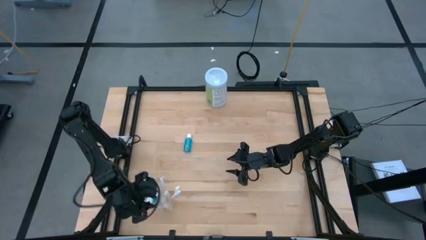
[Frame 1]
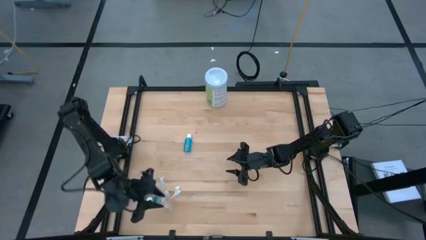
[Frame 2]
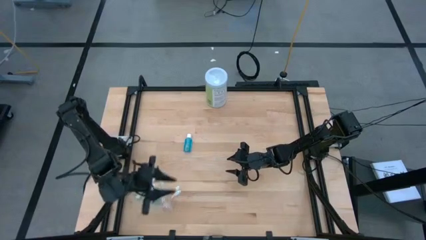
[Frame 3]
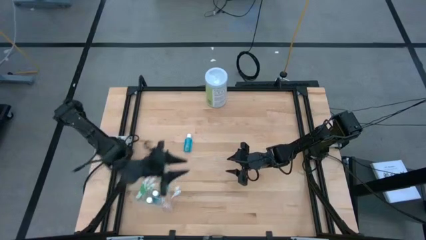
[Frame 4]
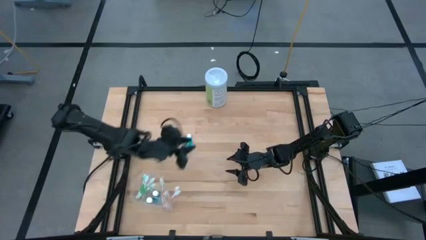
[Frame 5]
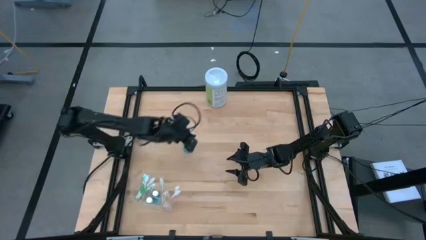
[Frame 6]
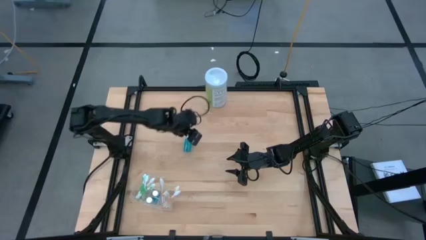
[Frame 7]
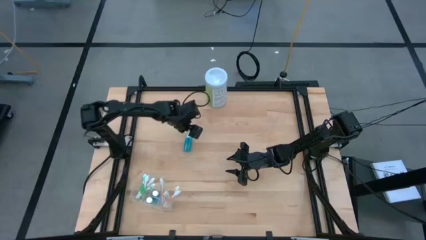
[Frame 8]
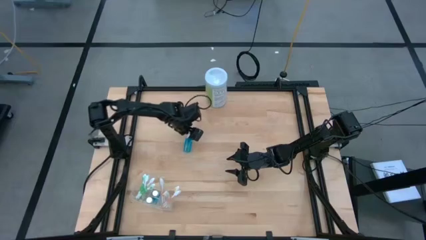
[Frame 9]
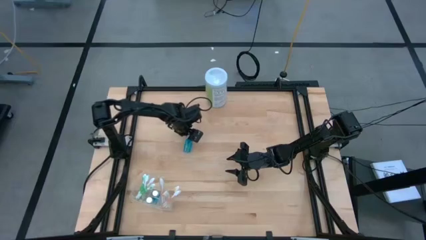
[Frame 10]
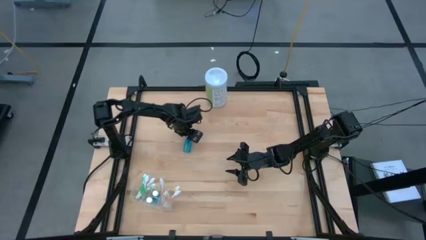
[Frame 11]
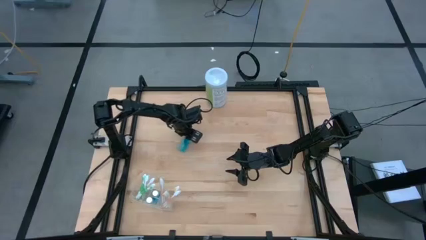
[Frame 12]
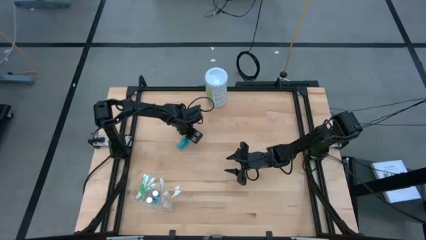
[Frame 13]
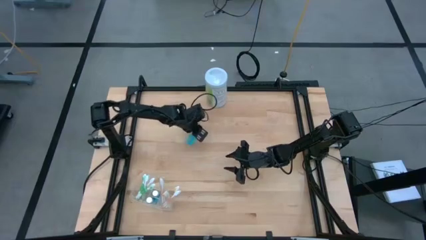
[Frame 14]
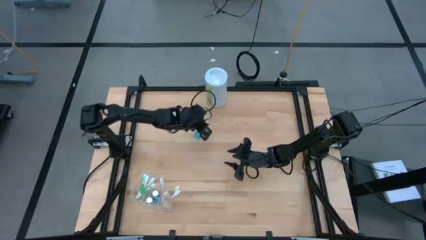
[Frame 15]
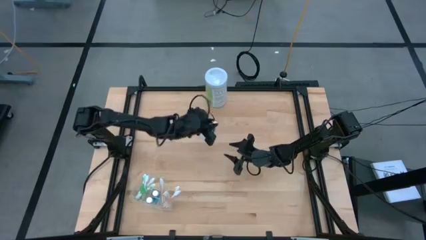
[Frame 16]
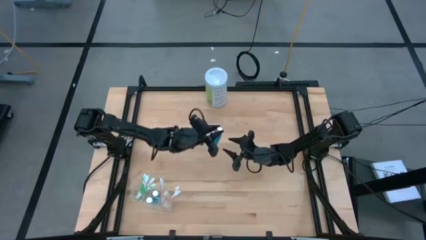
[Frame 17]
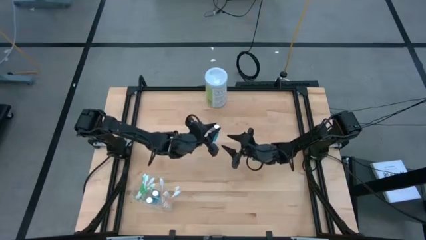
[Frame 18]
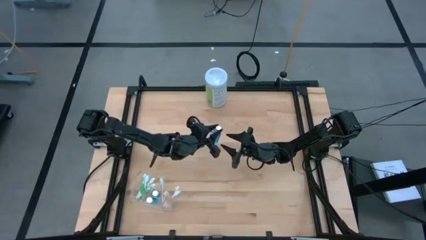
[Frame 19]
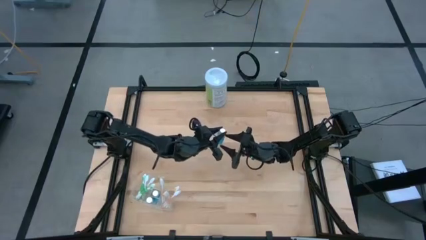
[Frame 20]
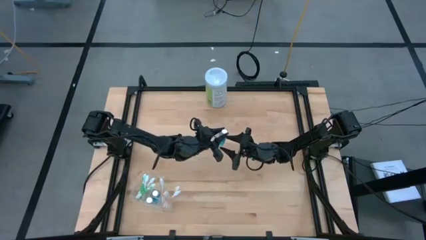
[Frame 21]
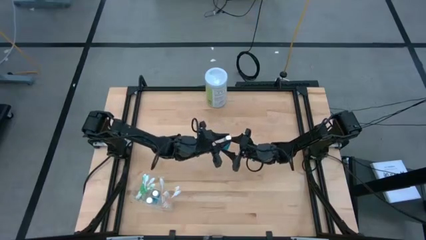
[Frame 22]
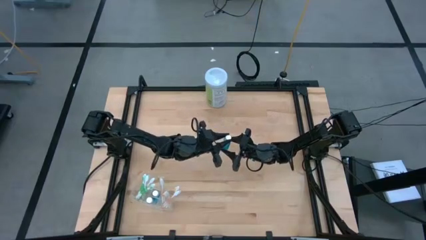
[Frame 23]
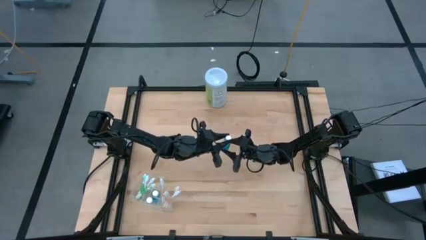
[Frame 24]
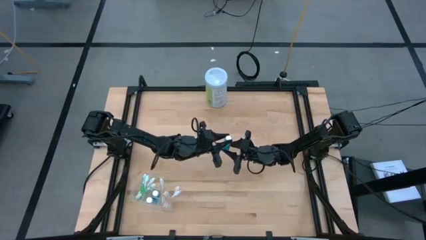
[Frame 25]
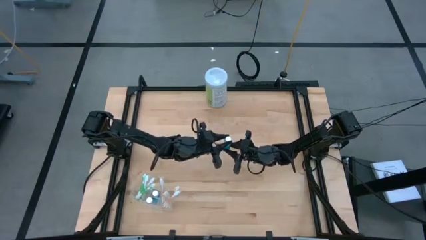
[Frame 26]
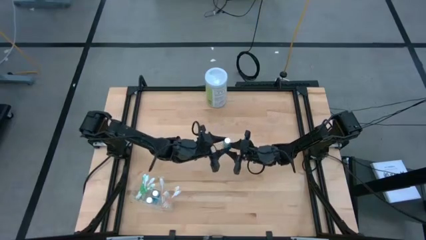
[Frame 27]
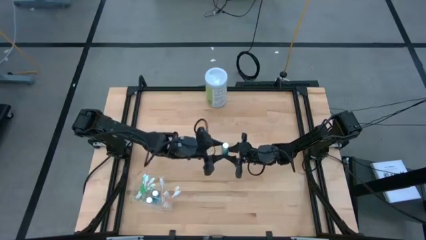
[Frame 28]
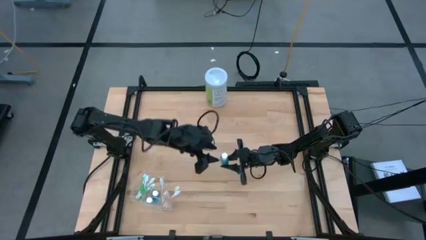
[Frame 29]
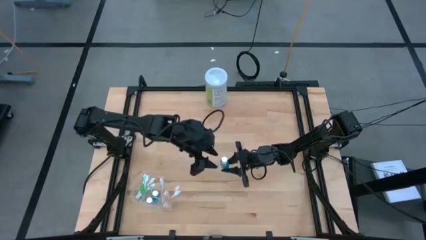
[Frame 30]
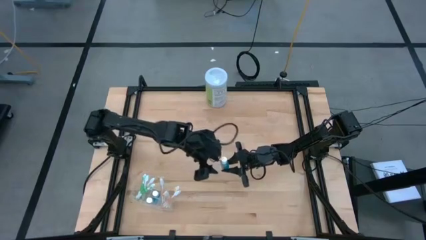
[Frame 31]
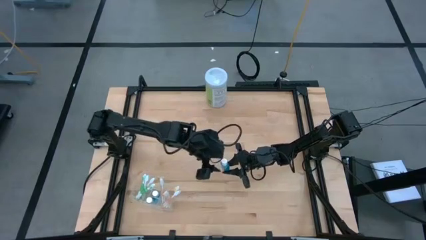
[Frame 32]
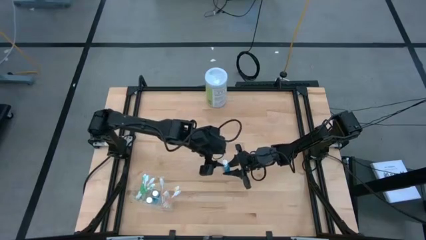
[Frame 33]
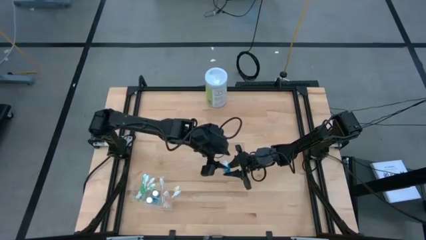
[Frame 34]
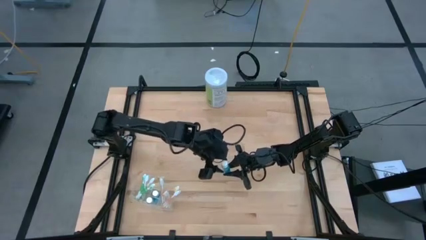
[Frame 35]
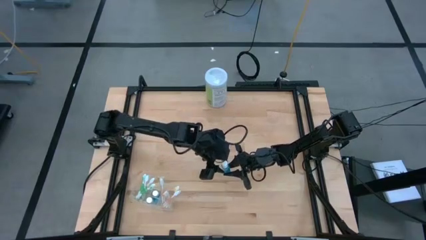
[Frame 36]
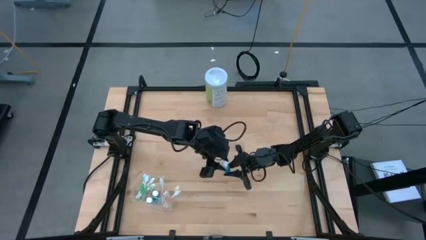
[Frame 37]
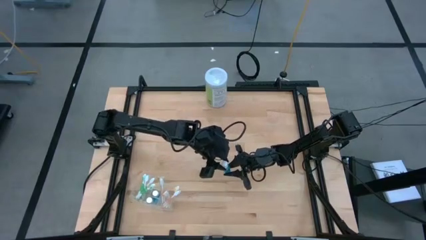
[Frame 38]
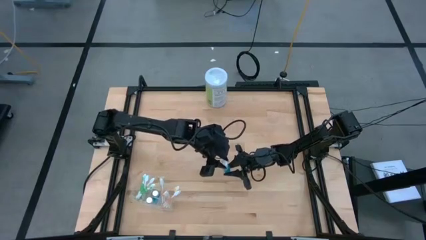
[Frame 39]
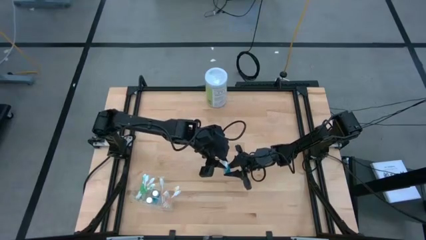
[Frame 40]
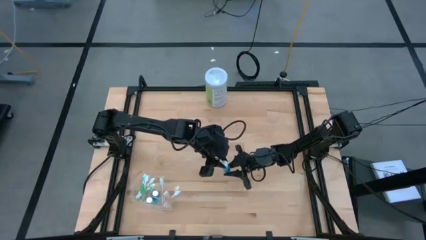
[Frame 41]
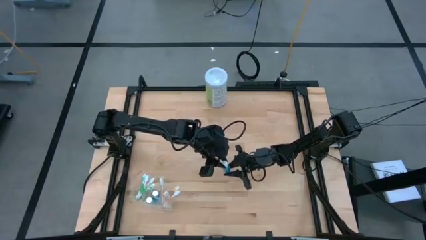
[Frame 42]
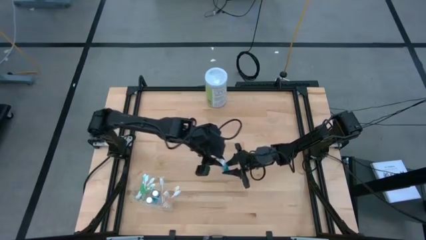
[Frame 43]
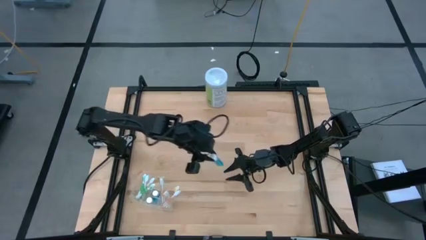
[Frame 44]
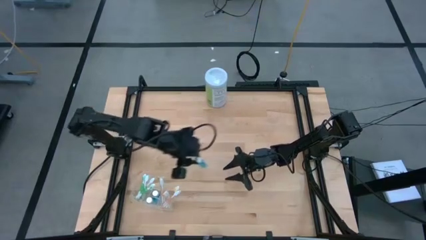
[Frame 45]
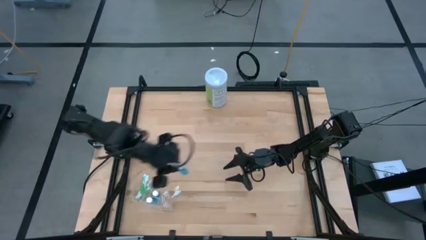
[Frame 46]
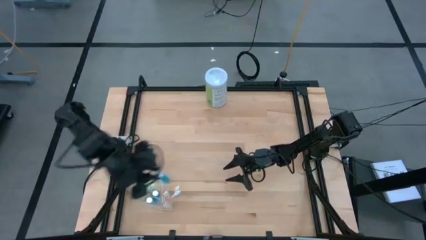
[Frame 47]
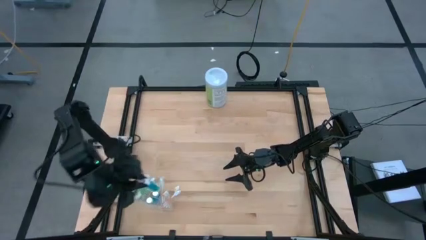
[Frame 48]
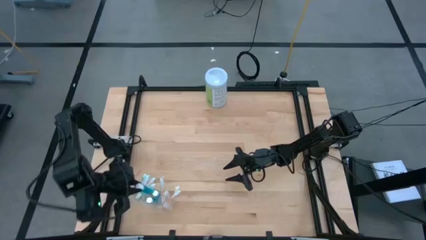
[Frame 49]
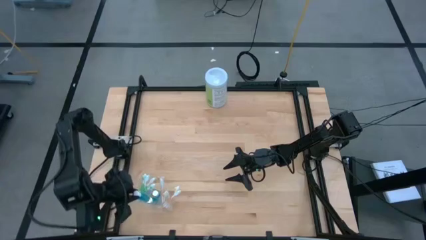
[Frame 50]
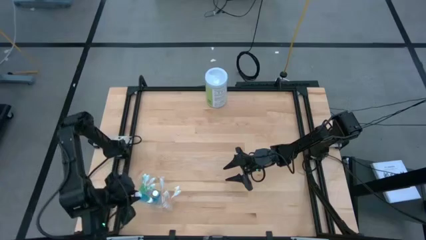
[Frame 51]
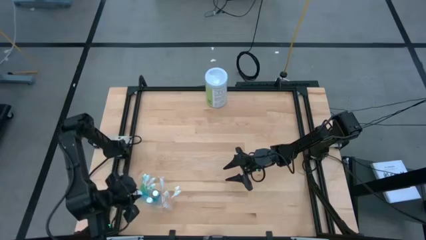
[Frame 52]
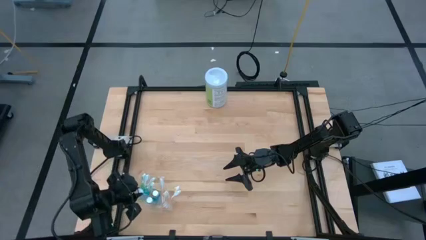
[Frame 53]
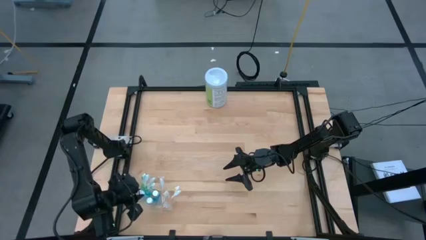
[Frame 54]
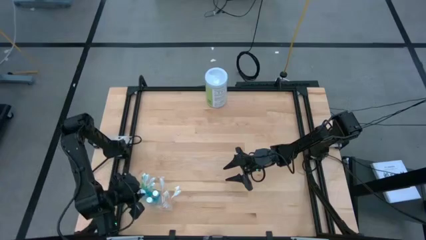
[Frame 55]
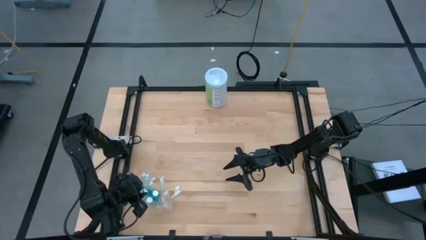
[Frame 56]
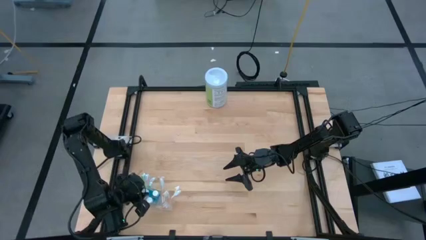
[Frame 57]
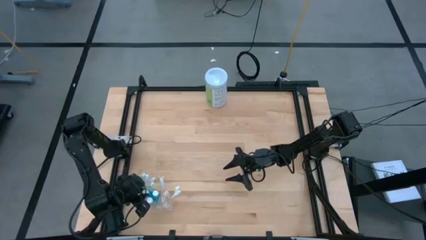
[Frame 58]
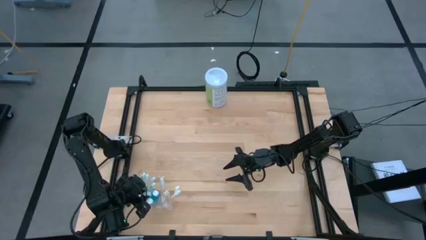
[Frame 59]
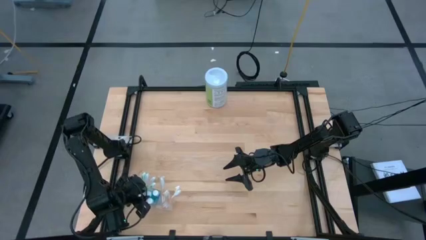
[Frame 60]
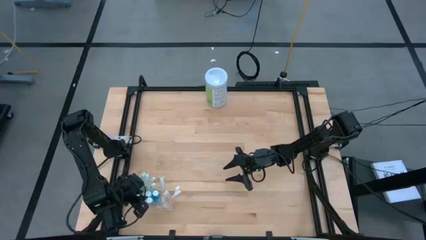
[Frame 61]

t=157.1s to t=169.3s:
Task: Pick & Place toothbrushing station
Put the blue mouthwash into the transparent organizer
